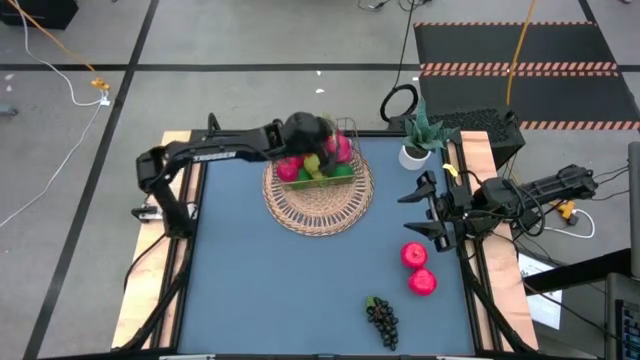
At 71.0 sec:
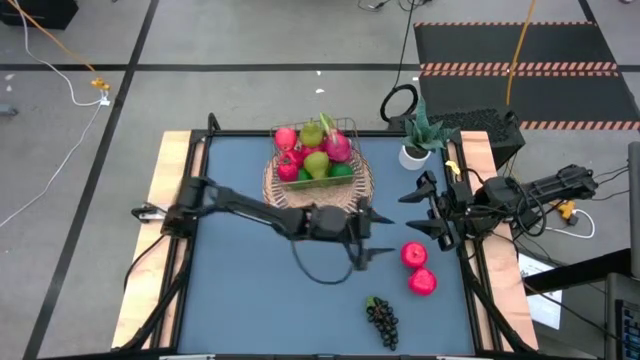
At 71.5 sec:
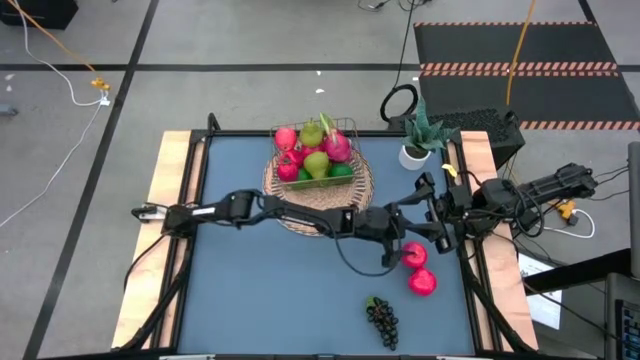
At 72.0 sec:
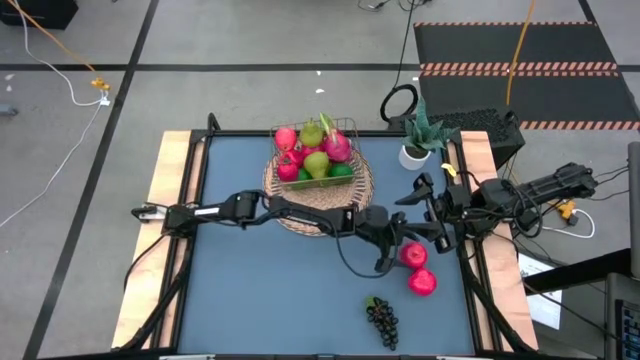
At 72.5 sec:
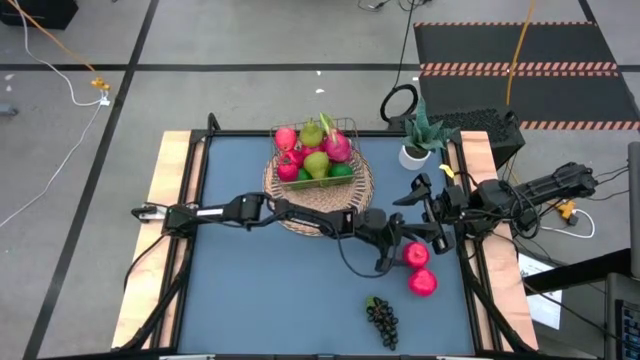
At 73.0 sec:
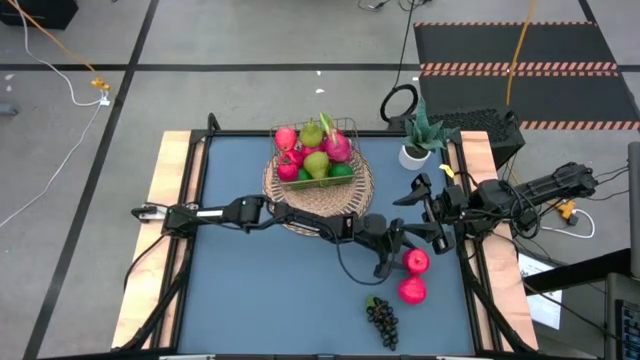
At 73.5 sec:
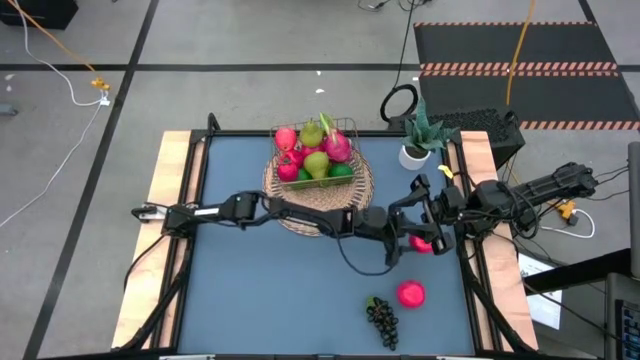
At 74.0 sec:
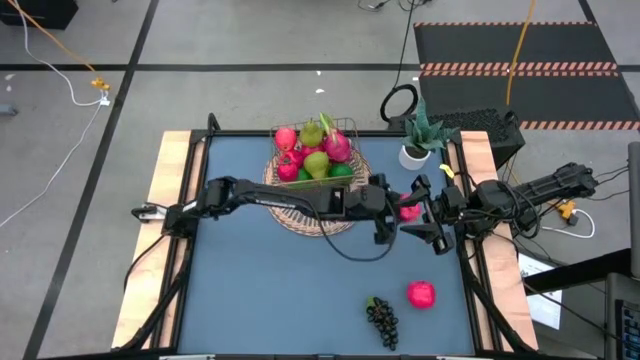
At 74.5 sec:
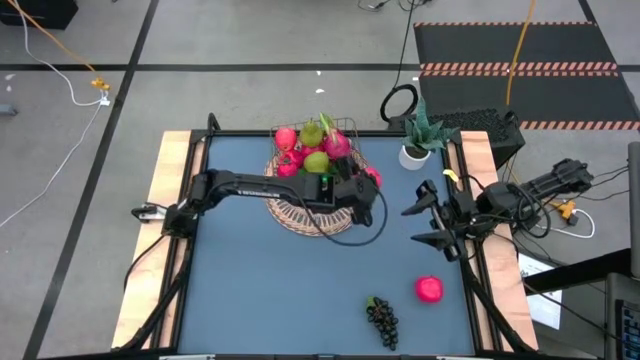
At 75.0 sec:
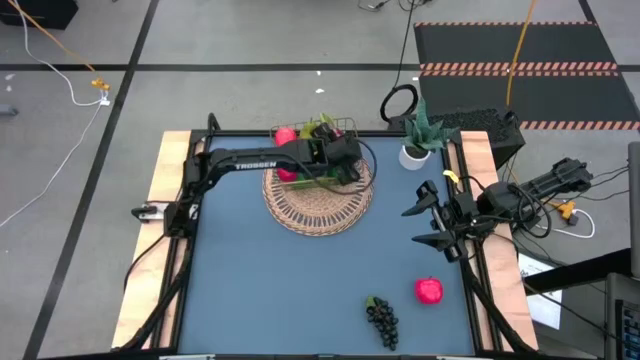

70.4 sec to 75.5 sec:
Task: Build produce basket
Put the red apple into the gold wire basket

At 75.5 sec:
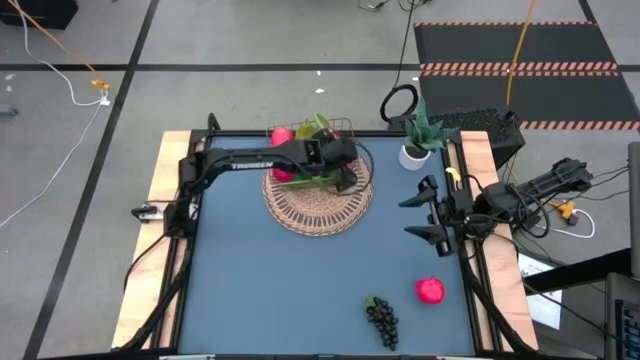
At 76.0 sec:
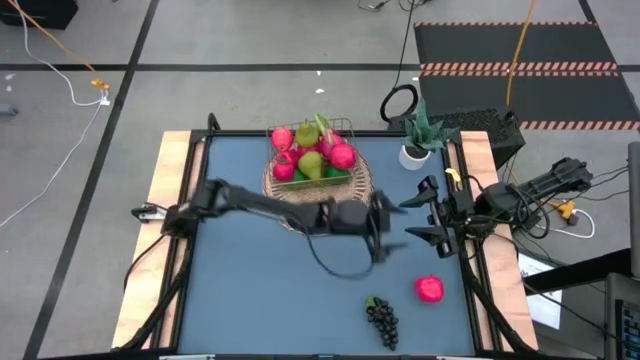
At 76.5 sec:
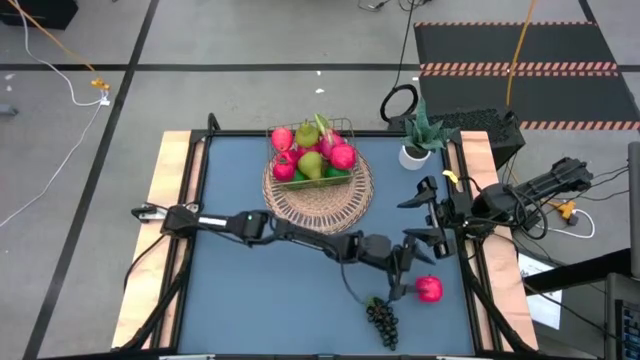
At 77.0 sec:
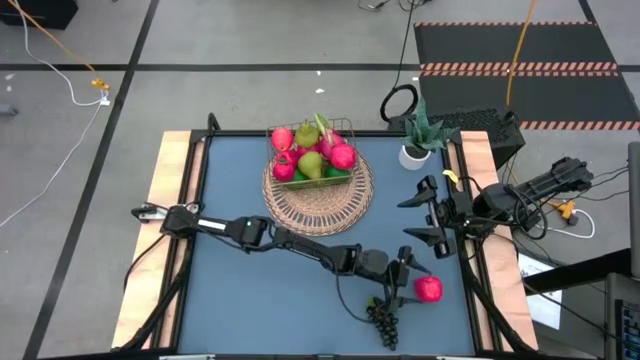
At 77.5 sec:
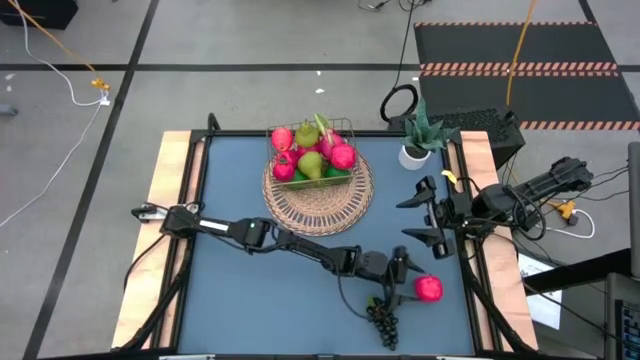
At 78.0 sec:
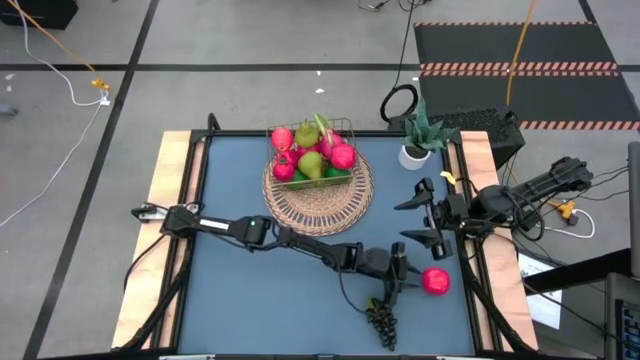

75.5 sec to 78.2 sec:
Put the red apple into the gold wire basket

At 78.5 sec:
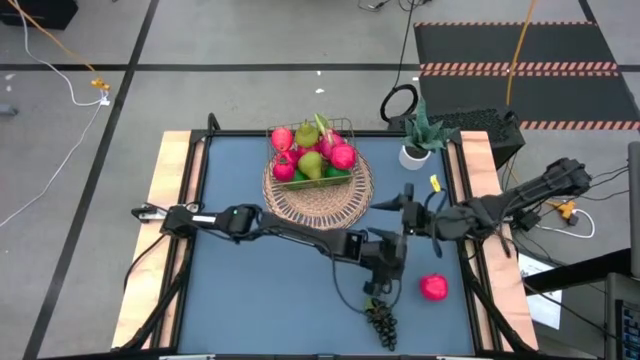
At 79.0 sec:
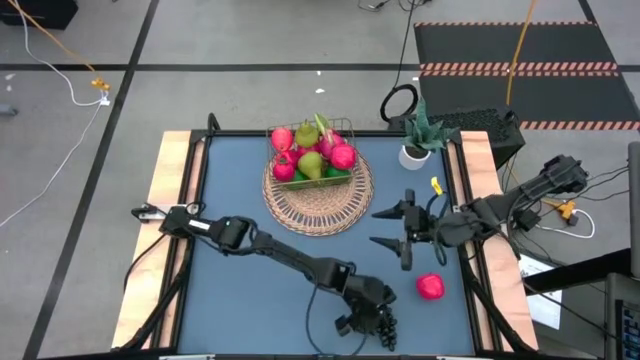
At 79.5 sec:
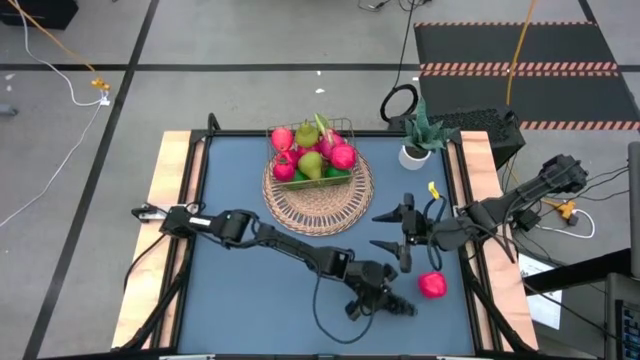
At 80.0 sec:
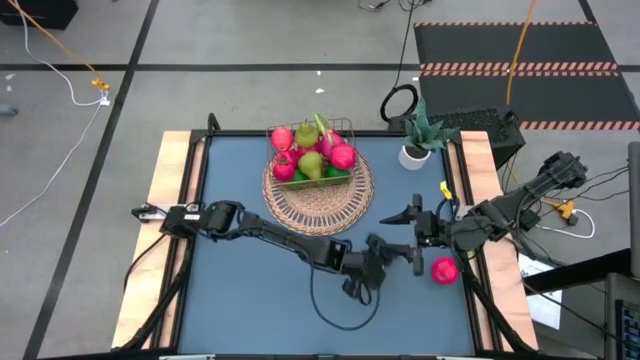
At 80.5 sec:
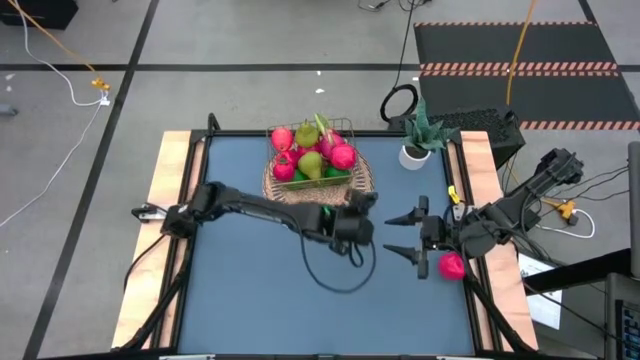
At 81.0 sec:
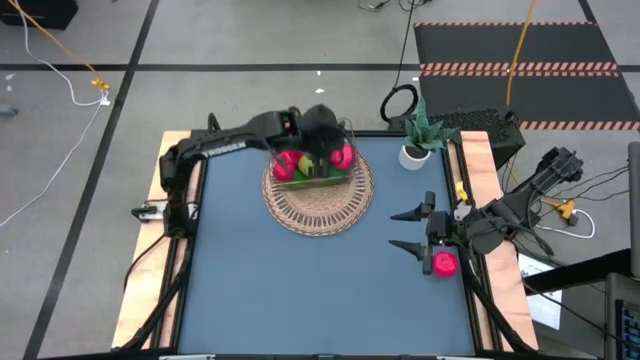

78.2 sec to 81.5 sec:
Put the black grapes into the gold wire basket

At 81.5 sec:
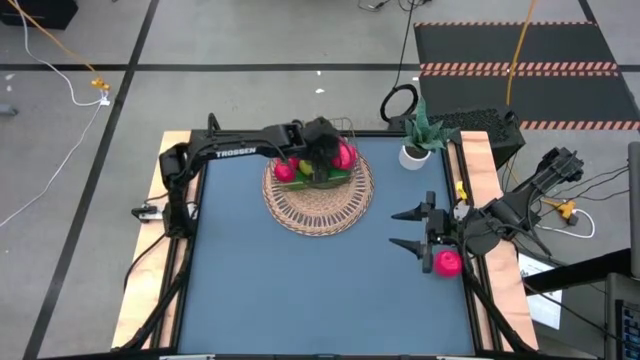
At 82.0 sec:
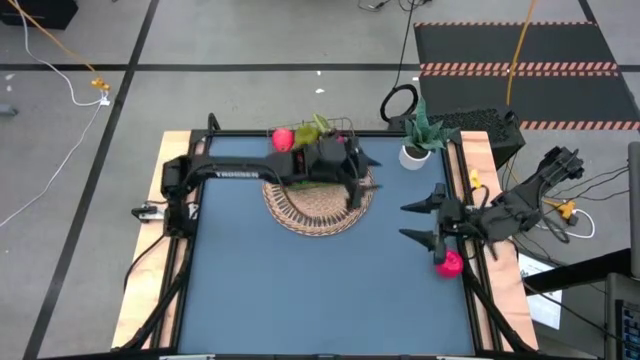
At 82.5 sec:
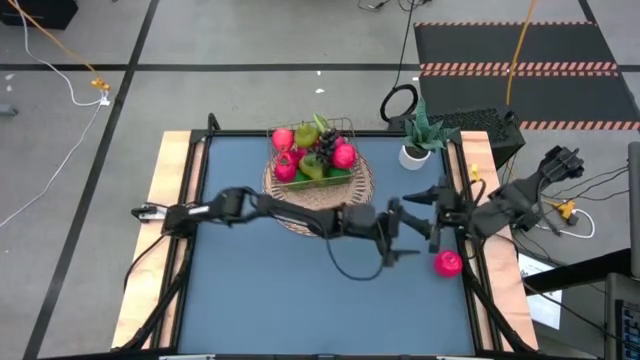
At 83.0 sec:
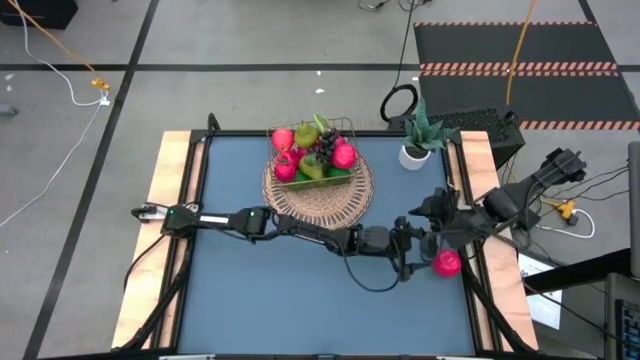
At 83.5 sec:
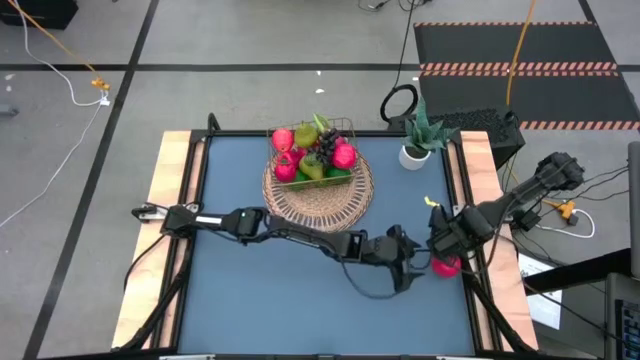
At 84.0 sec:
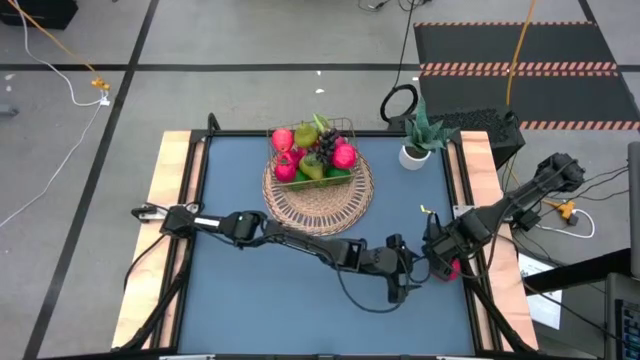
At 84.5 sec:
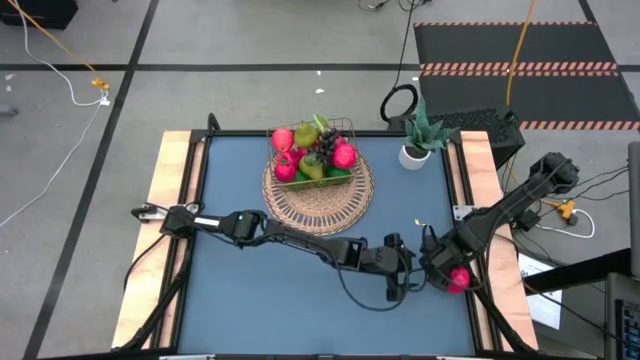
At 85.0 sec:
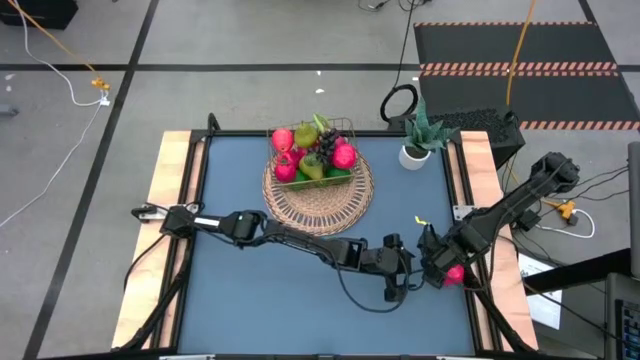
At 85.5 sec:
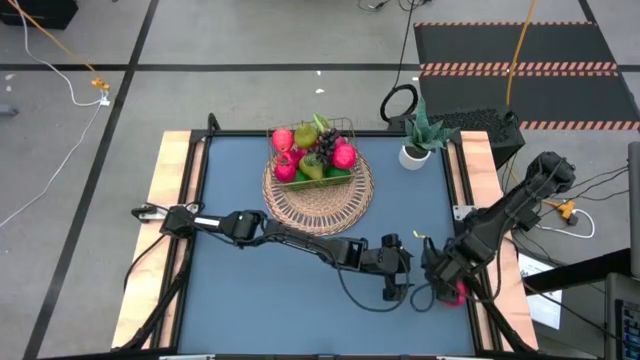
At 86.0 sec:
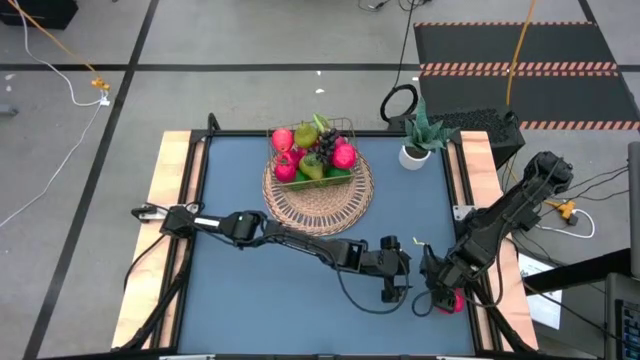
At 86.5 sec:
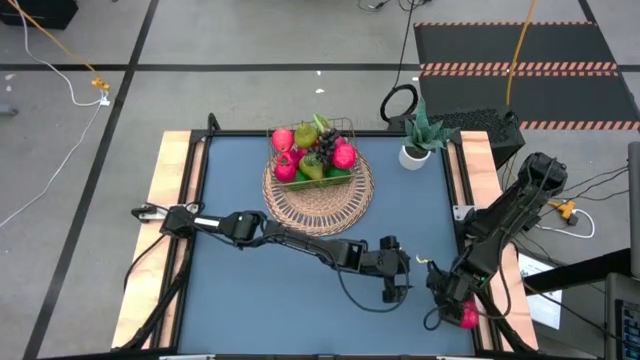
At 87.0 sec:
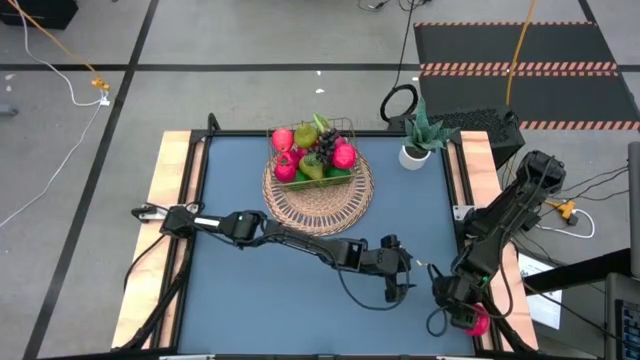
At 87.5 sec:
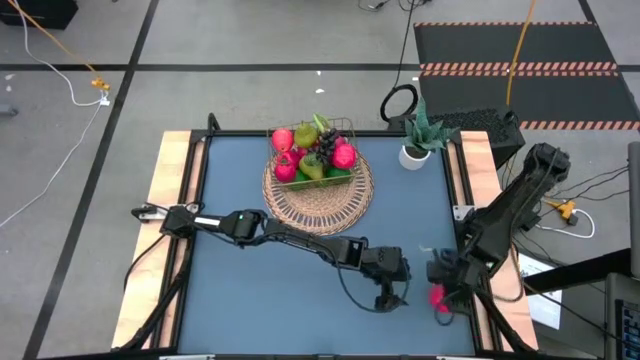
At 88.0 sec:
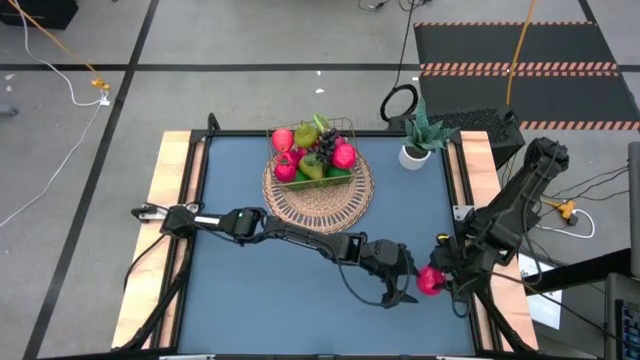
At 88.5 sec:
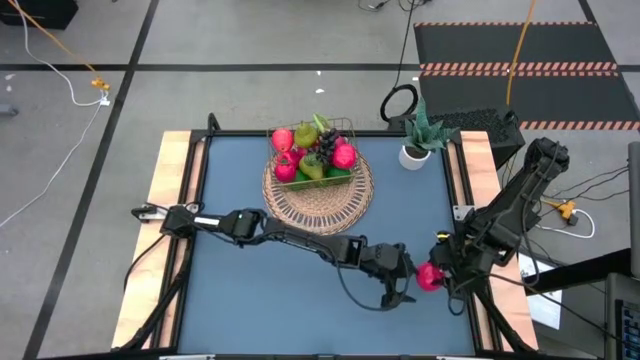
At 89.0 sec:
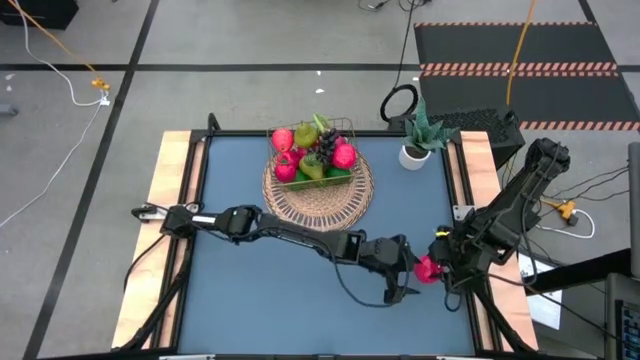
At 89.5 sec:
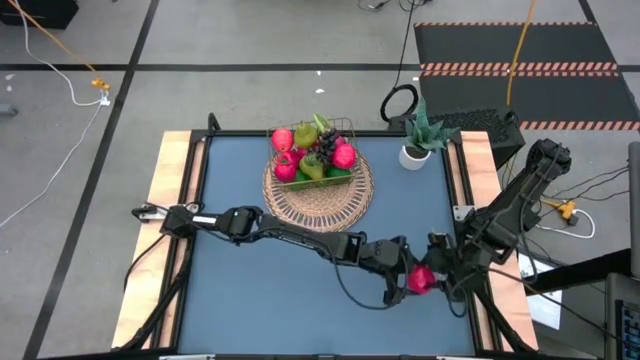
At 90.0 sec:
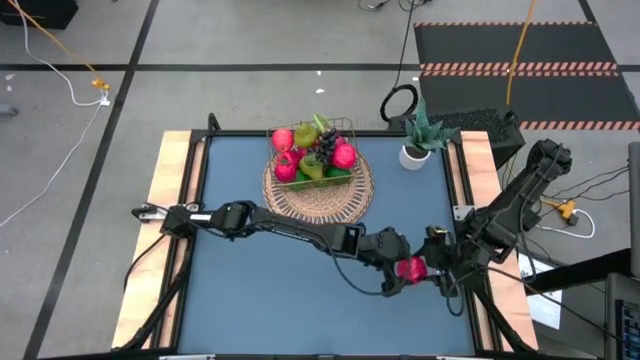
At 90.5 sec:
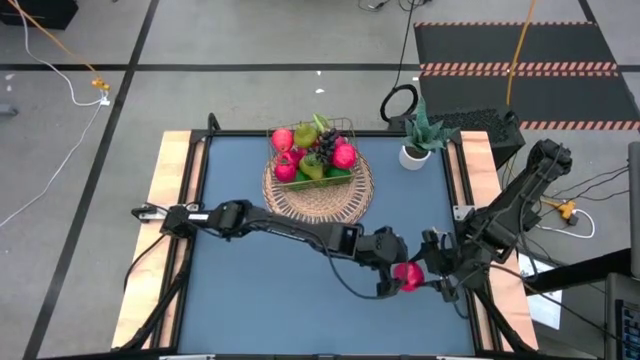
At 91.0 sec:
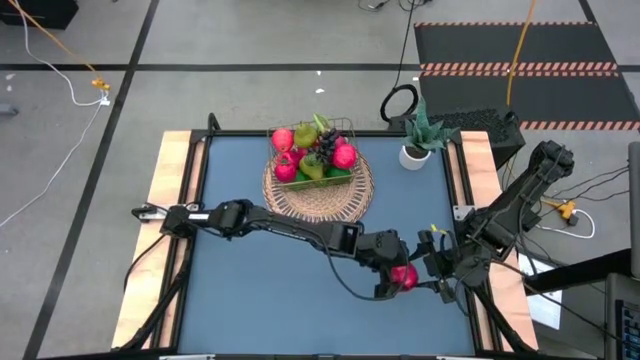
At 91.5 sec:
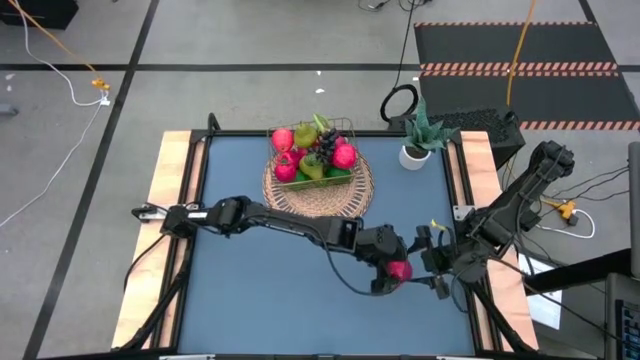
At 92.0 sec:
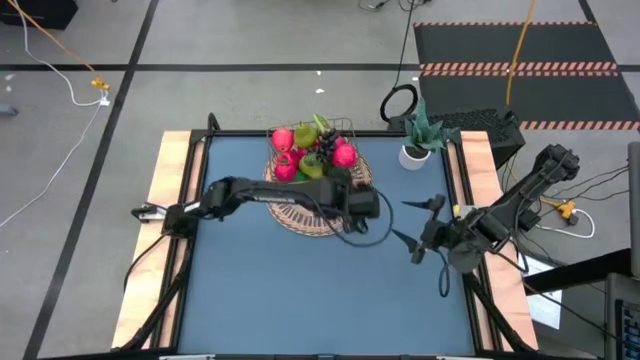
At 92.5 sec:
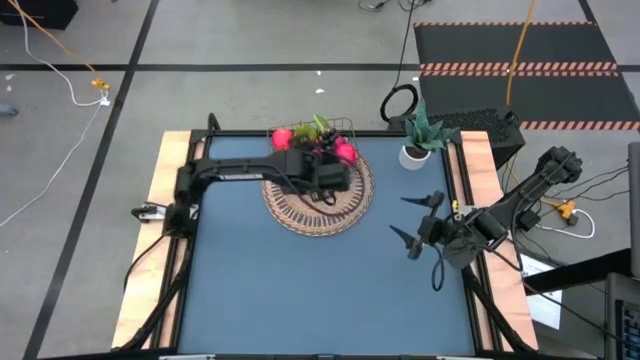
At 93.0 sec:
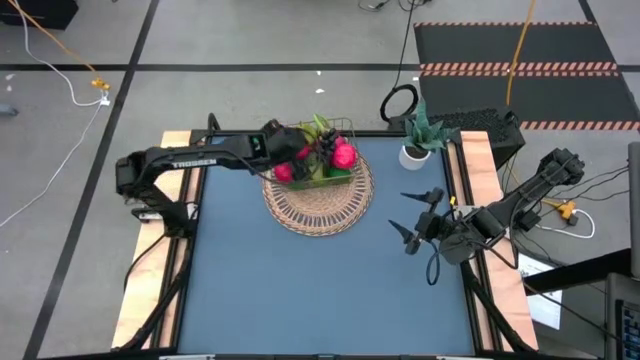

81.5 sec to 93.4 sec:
Put the red apple into the gold wire basket
